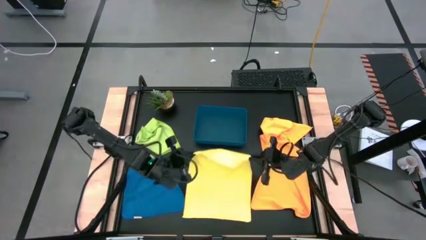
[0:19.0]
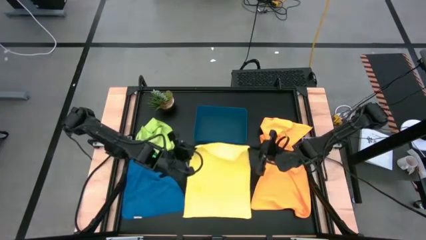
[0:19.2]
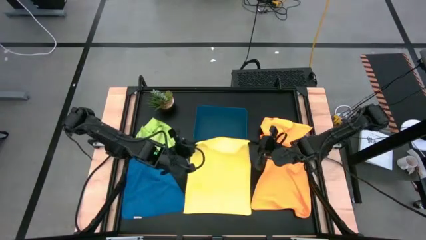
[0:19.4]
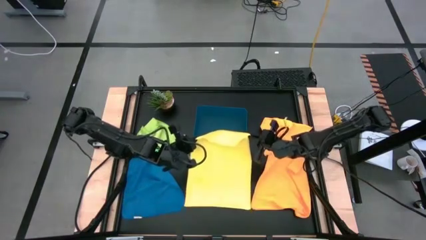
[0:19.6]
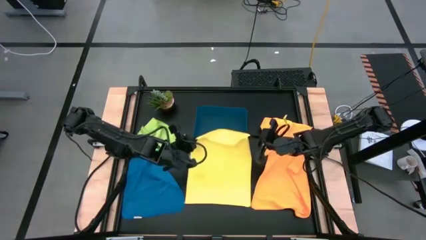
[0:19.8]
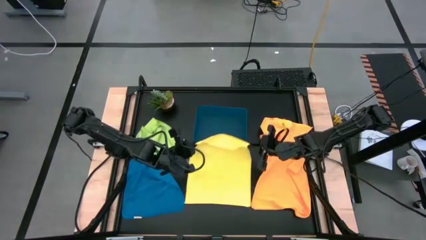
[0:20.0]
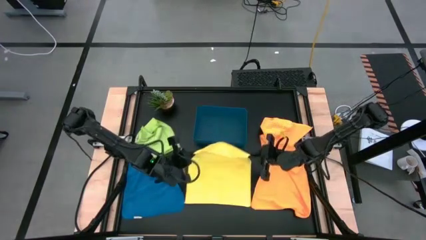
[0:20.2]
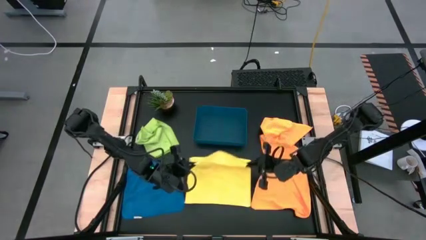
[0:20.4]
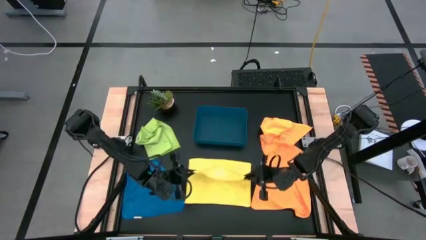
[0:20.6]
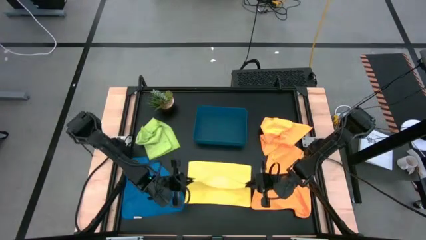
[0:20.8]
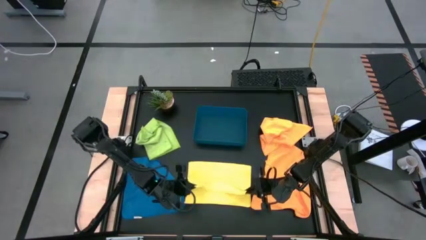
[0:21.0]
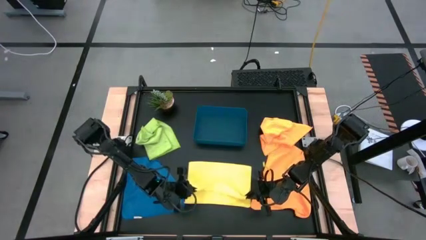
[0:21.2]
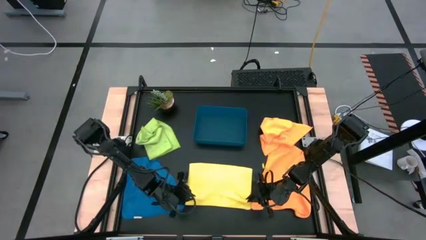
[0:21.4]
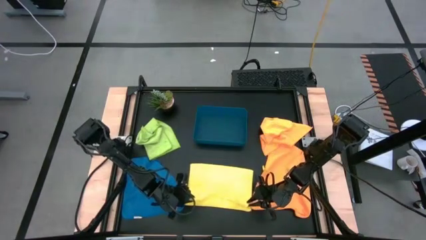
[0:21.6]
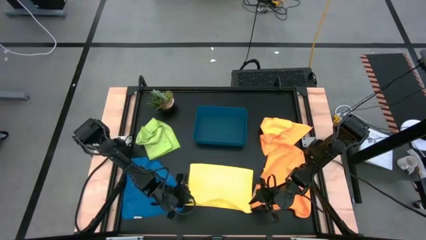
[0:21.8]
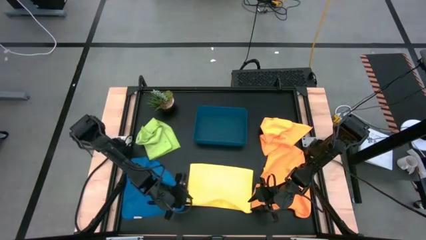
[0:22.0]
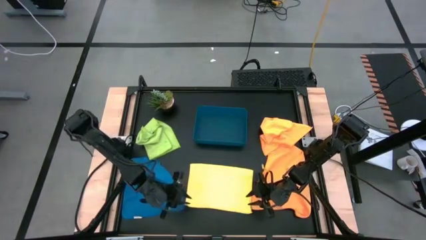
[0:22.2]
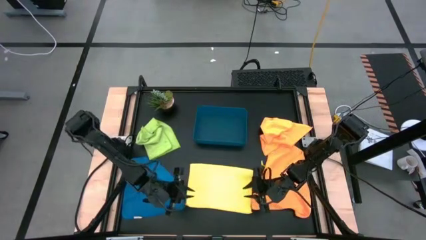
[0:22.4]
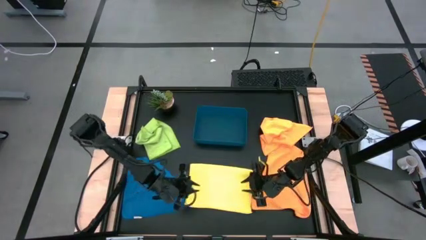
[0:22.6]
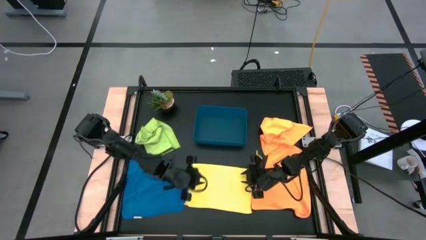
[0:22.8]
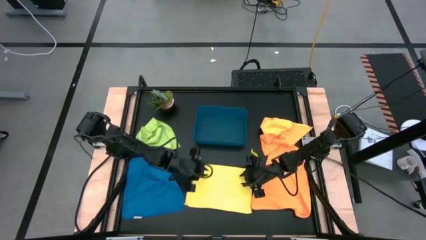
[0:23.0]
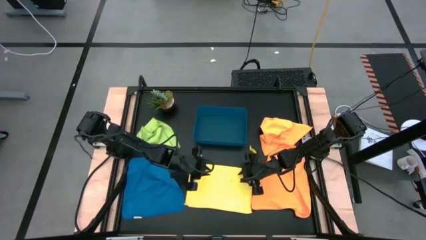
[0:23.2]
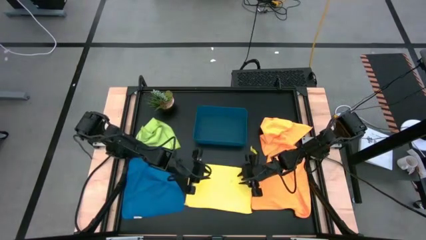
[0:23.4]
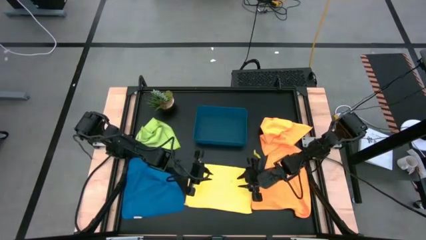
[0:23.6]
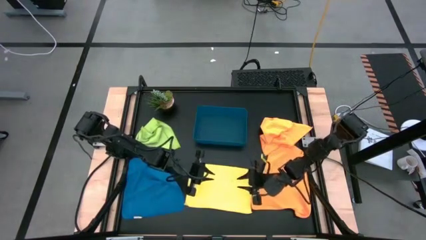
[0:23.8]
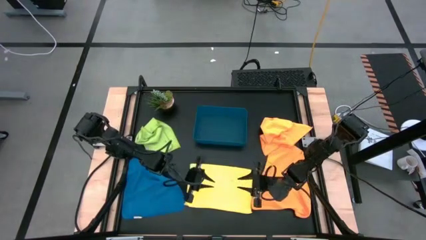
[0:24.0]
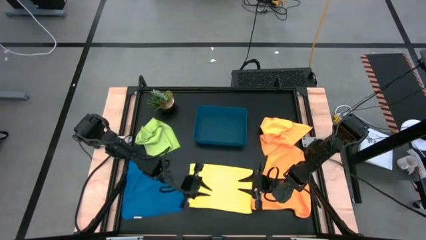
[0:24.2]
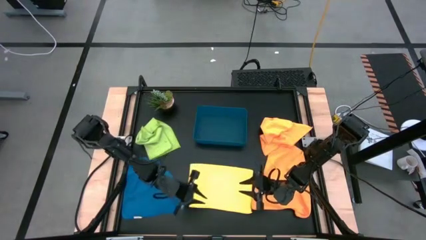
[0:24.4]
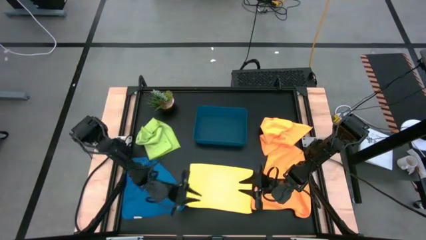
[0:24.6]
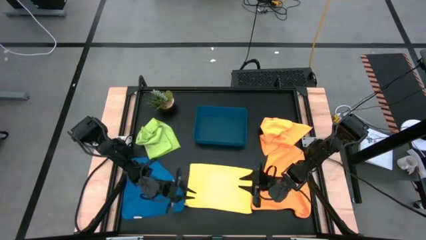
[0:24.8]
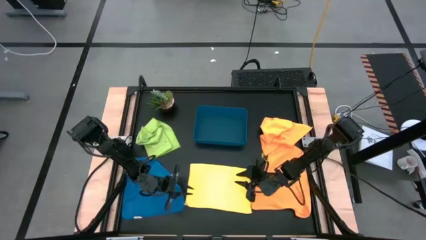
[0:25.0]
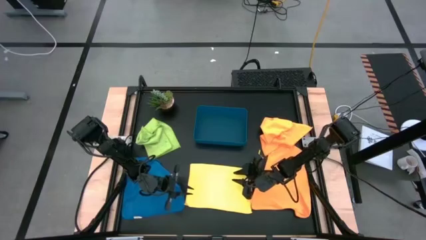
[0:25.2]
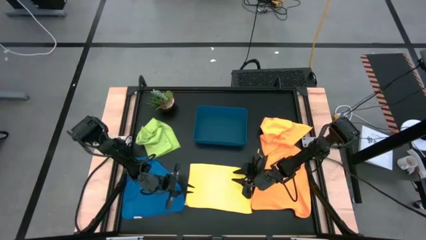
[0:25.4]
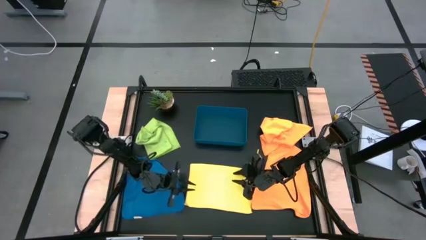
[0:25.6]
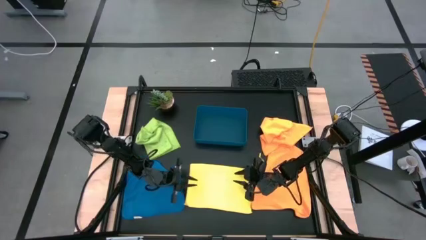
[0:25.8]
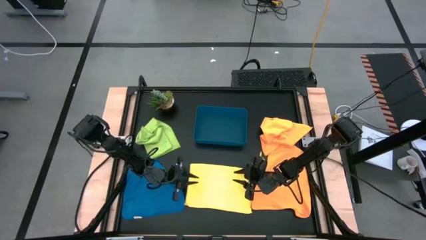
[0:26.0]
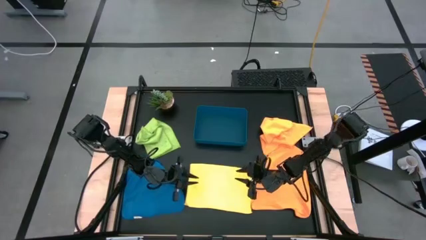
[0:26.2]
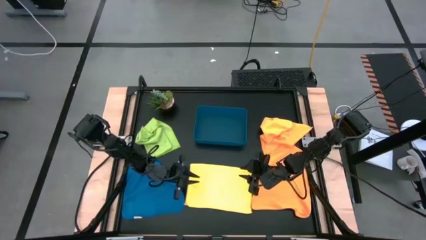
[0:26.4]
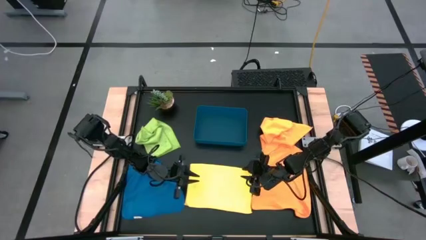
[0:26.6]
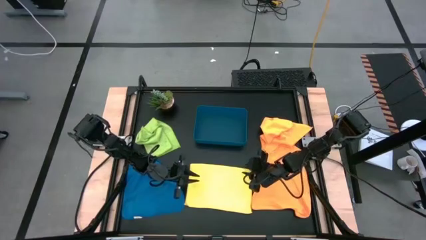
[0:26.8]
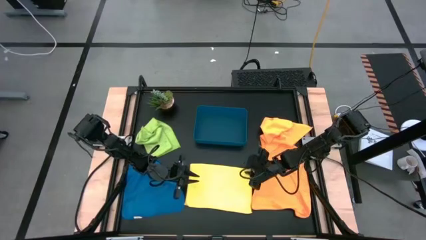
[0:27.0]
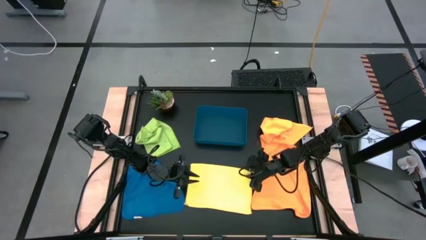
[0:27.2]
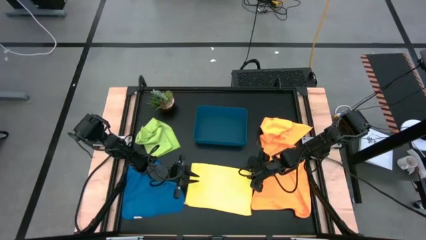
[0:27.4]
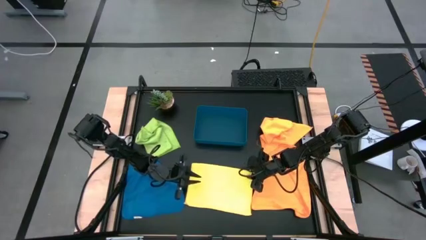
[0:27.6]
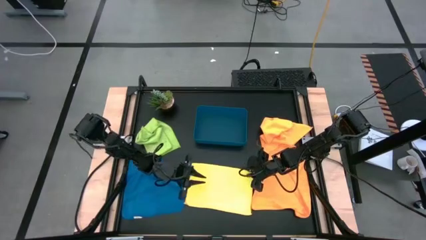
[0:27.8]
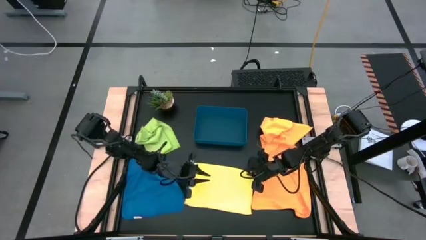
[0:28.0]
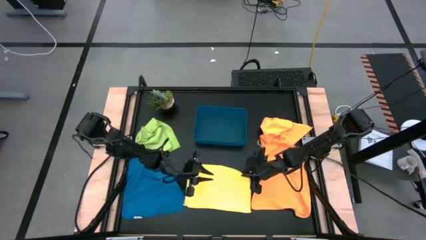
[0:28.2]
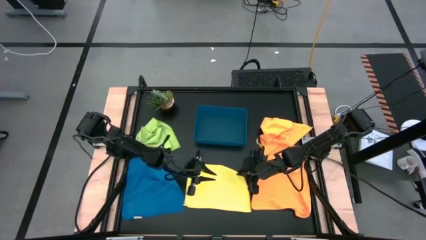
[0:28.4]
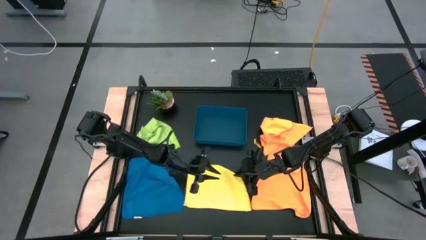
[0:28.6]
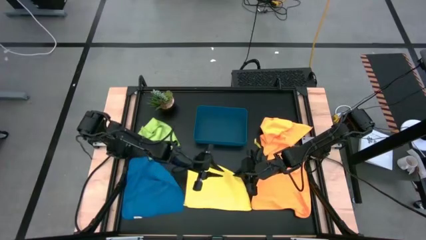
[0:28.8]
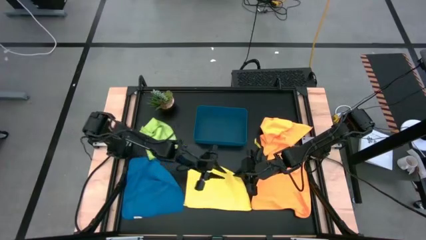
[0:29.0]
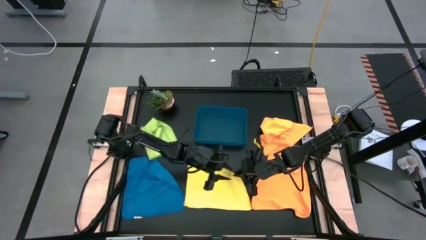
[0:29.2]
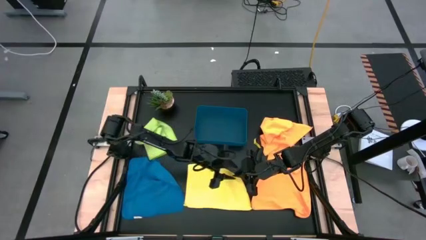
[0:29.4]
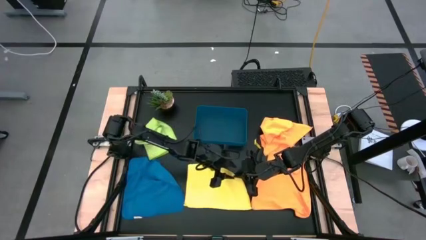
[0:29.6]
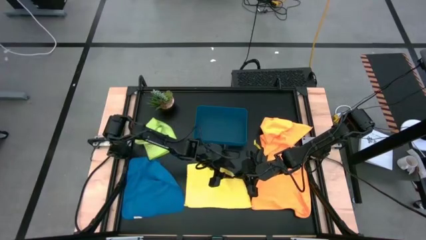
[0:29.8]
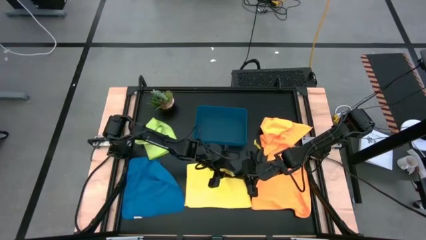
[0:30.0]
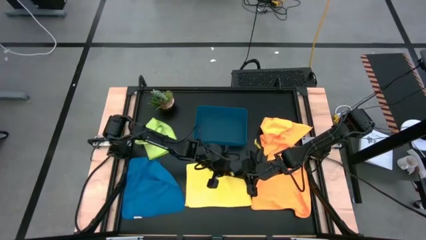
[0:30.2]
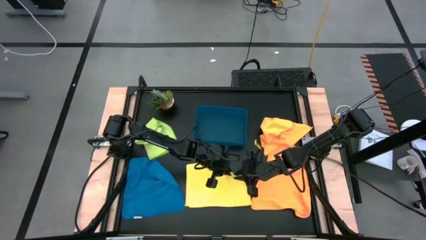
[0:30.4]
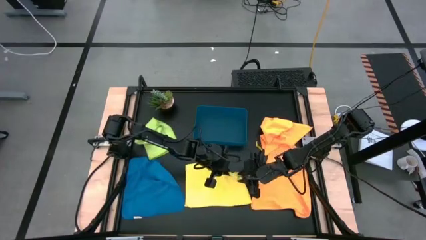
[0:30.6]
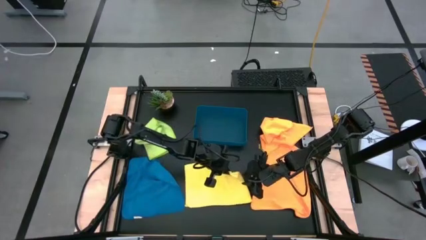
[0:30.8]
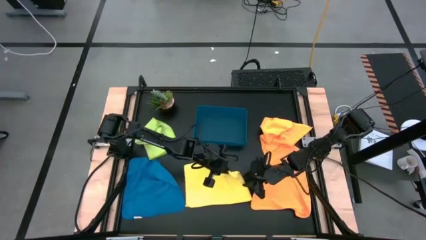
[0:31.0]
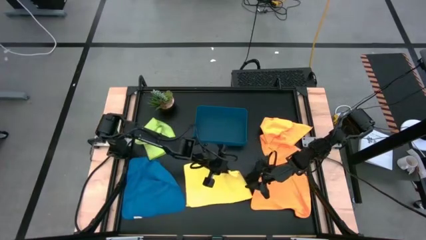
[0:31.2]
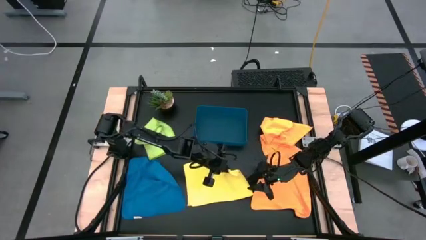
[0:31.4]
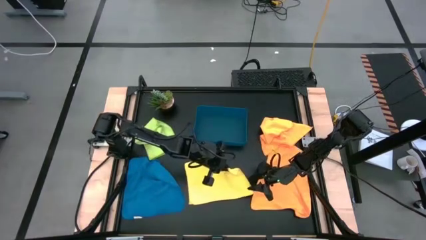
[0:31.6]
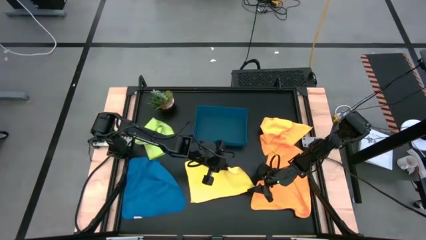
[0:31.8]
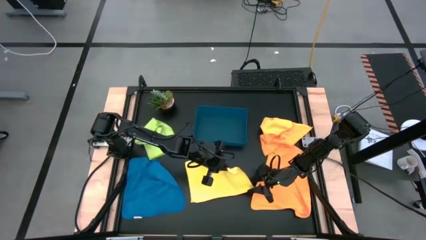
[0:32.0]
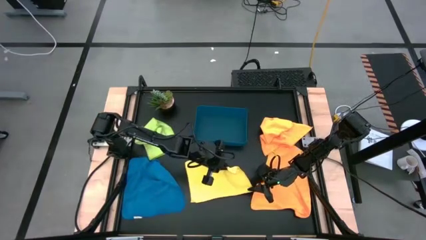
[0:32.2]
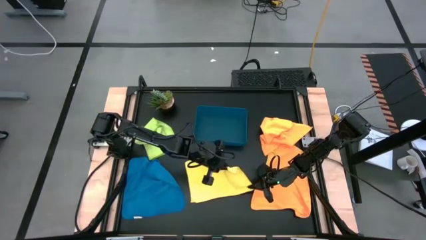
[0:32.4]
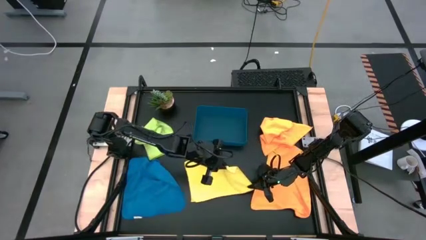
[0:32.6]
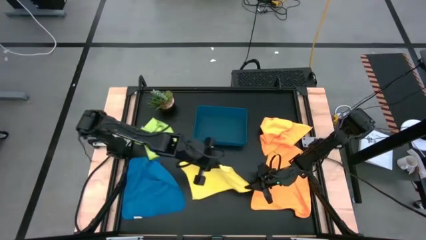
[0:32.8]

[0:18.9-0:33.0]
Task: Fold microfiber towels
Fold the yellow microfiber cloth

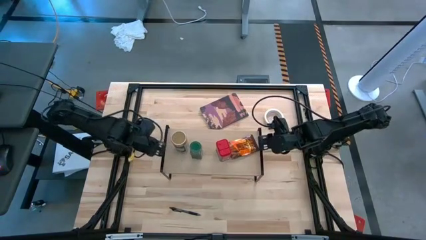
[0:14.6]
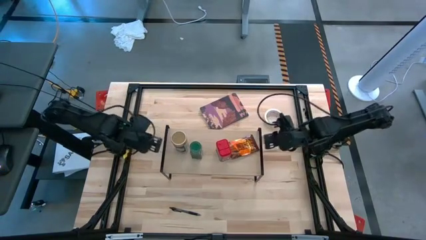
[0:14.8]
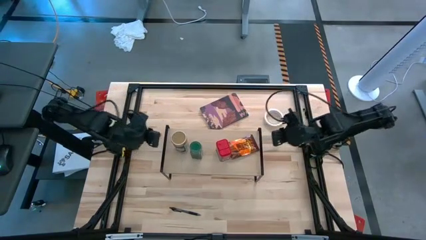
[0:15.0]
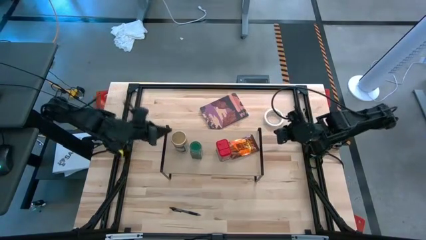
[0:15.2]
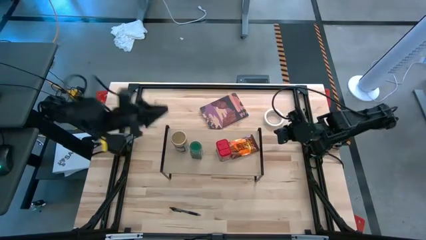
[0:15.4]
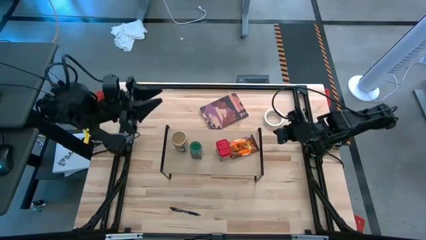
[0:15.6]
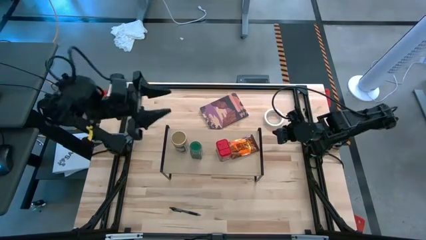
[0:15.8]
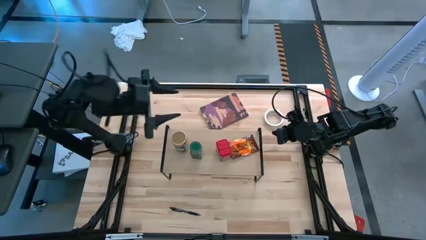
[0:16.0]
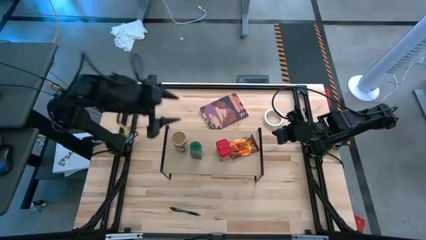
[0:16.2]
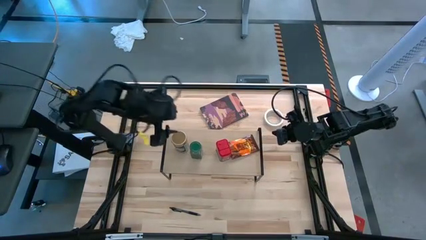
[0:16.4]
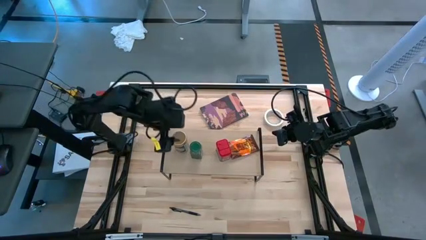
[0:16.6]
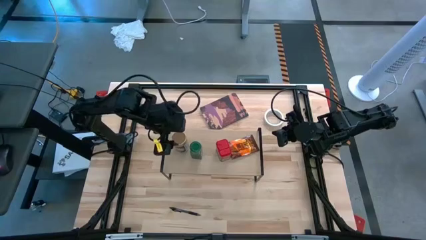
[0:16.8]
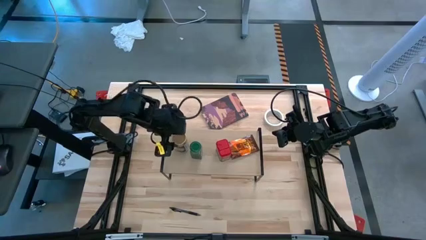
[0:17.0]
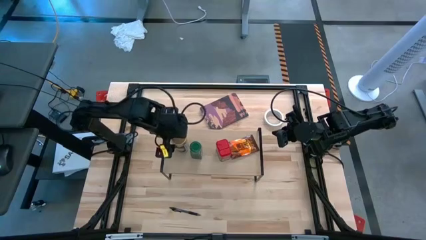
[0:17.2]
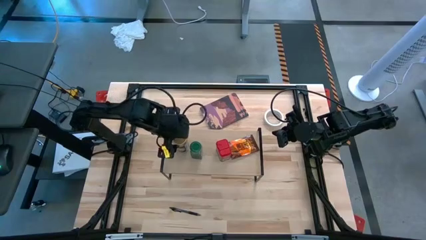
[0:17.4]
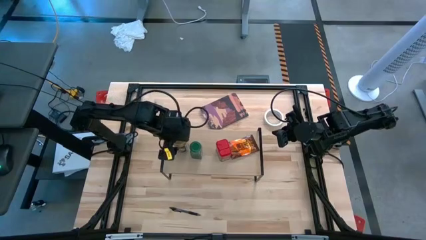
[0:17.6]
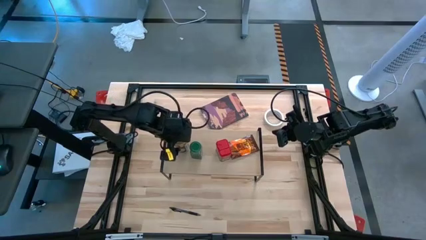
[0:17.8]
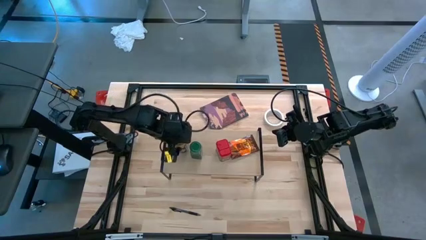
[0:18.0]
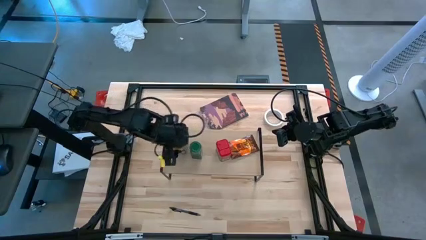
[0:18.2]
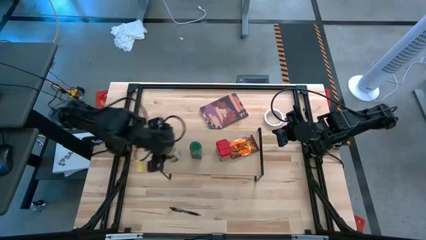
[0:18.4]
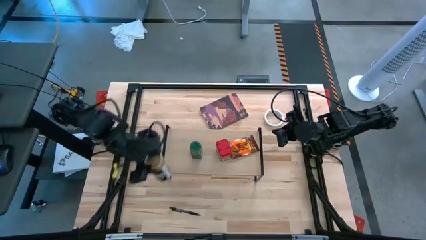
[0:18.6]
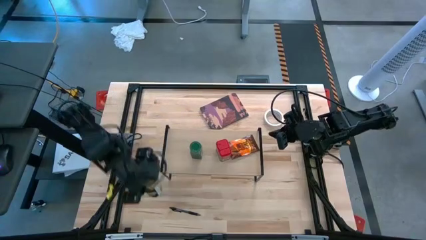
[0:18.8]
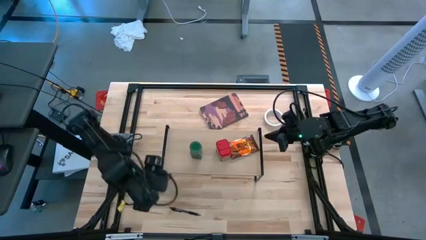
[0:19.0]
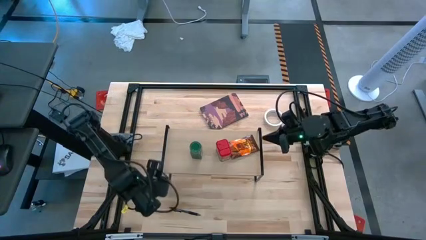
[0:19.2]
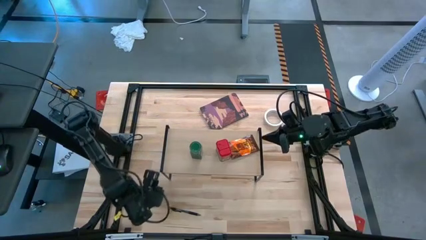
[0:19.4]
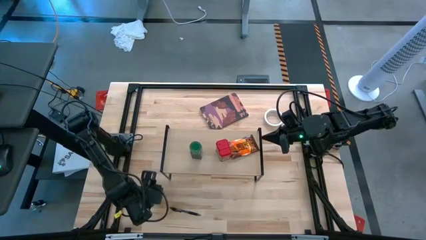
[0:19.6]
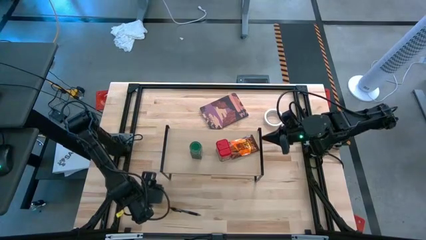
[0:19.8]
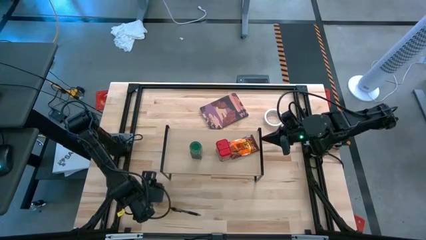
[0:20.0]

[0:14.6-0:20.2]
Task: Shelf spices
Remove the brown seasoning bottle from the shelf
